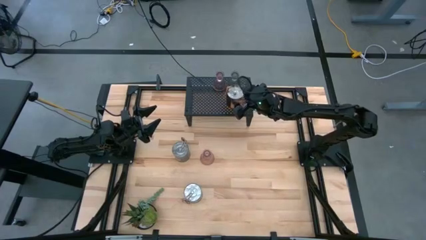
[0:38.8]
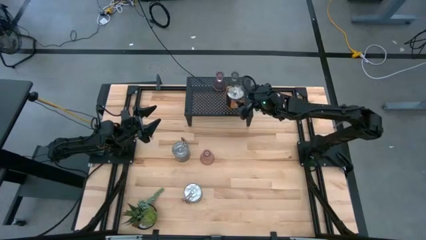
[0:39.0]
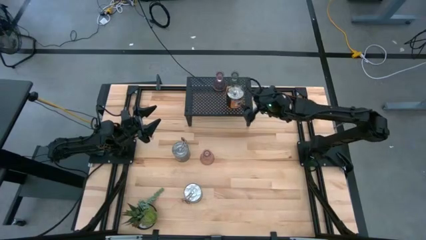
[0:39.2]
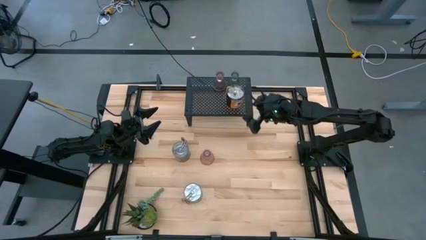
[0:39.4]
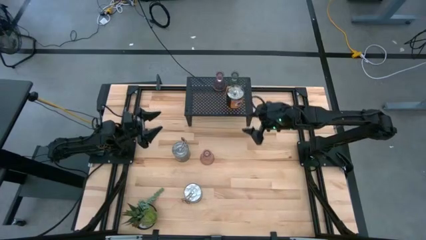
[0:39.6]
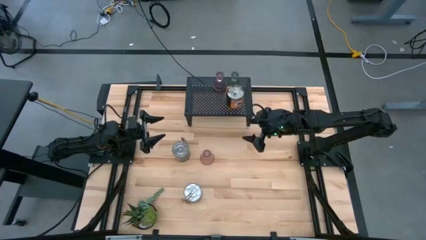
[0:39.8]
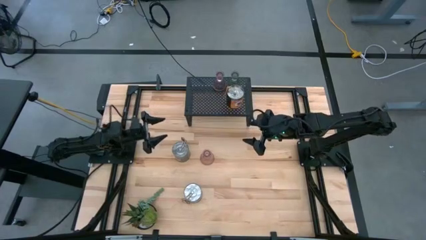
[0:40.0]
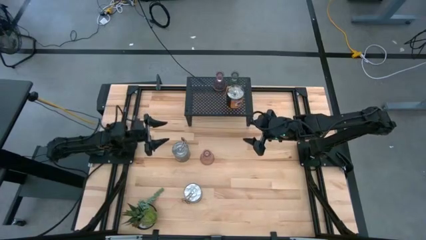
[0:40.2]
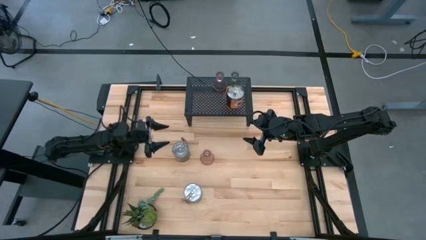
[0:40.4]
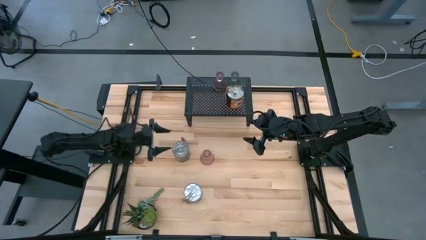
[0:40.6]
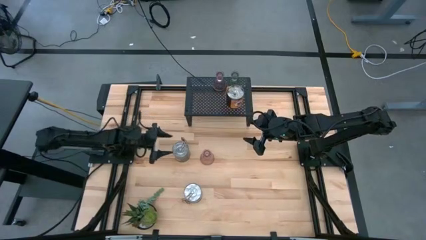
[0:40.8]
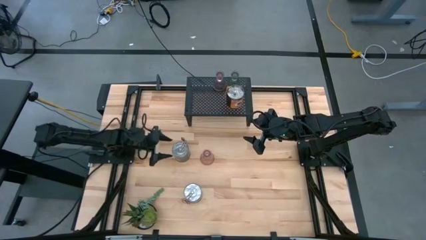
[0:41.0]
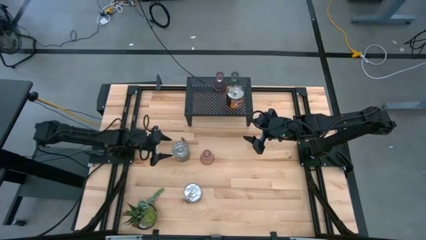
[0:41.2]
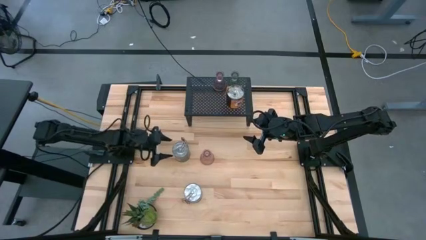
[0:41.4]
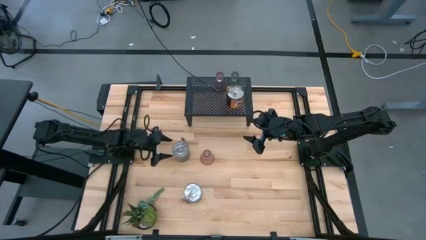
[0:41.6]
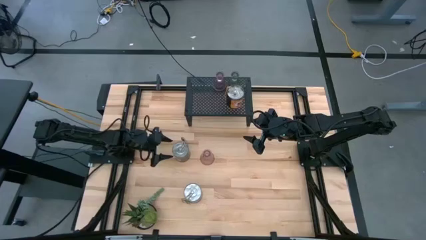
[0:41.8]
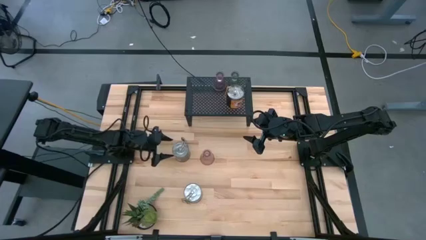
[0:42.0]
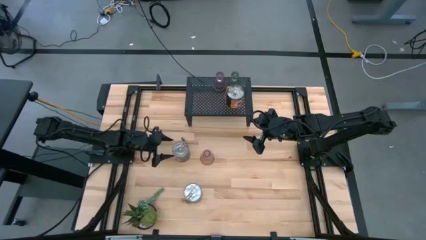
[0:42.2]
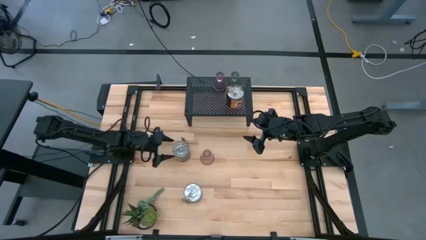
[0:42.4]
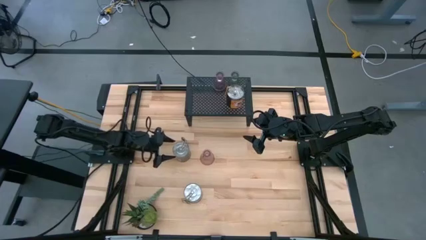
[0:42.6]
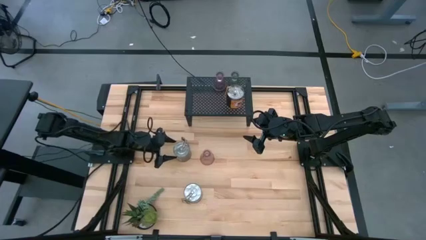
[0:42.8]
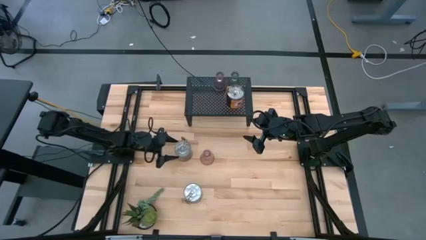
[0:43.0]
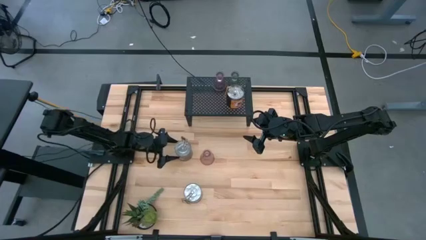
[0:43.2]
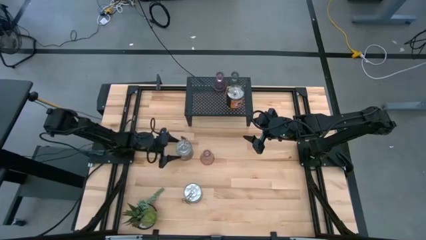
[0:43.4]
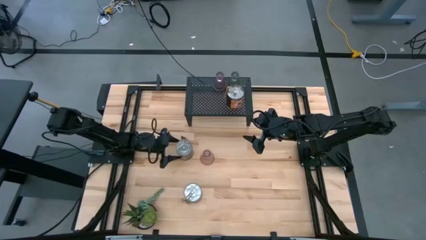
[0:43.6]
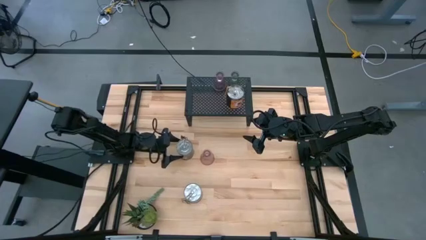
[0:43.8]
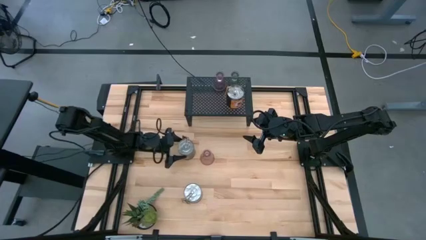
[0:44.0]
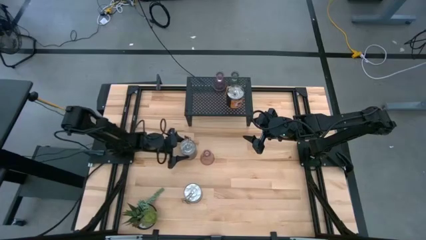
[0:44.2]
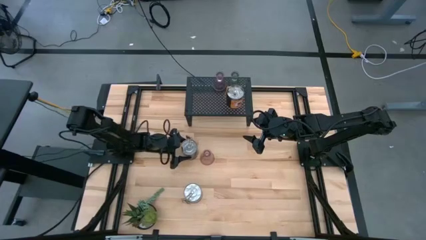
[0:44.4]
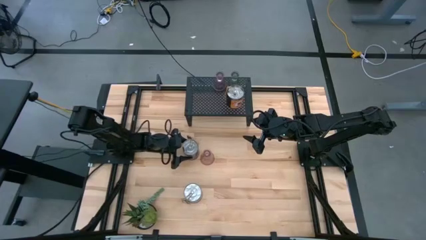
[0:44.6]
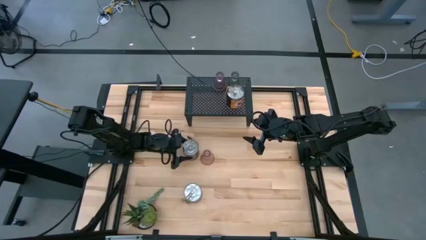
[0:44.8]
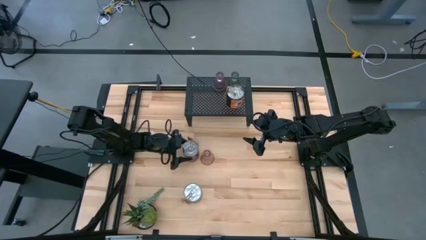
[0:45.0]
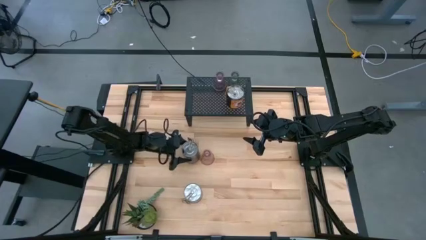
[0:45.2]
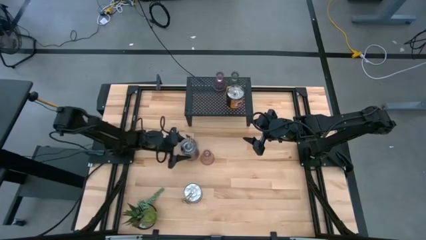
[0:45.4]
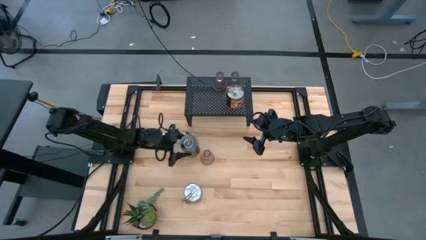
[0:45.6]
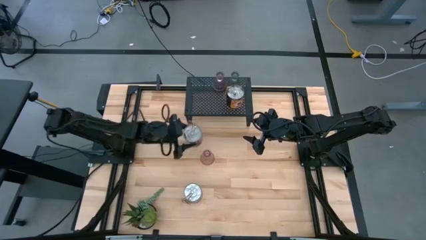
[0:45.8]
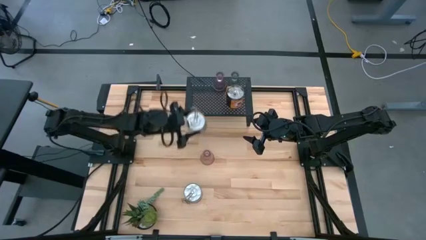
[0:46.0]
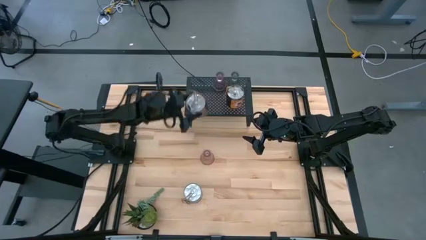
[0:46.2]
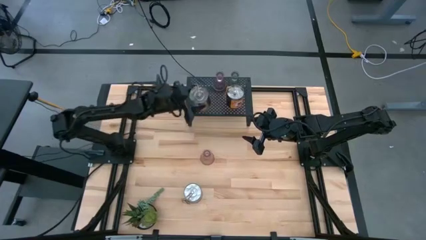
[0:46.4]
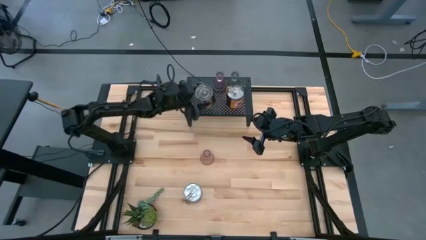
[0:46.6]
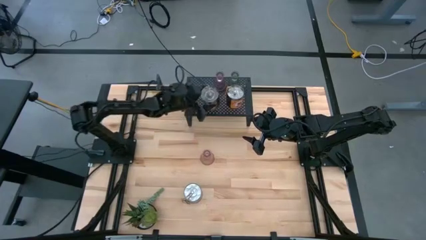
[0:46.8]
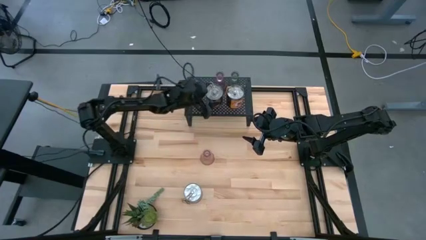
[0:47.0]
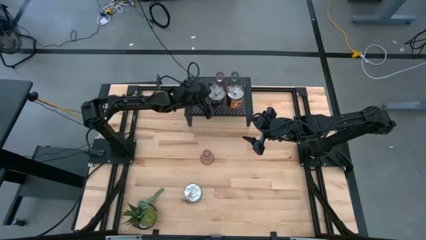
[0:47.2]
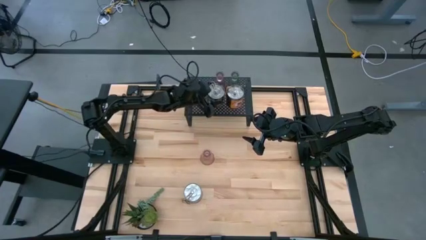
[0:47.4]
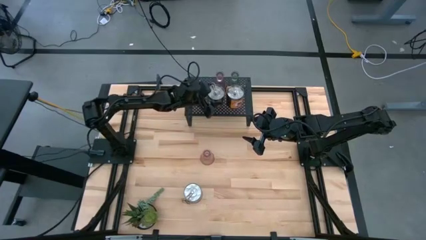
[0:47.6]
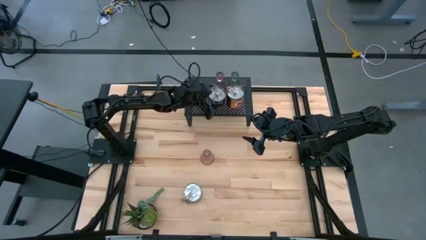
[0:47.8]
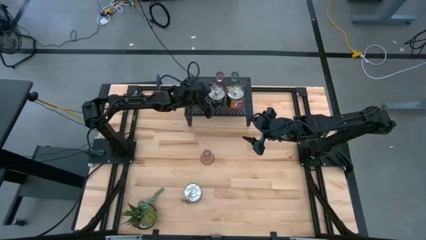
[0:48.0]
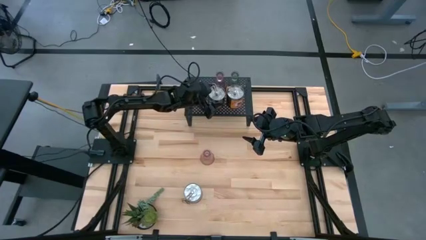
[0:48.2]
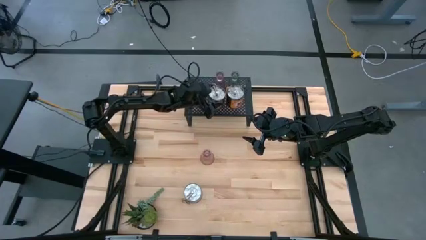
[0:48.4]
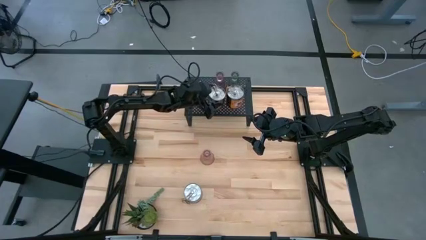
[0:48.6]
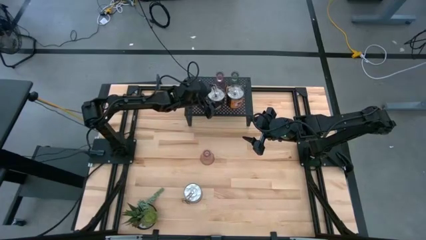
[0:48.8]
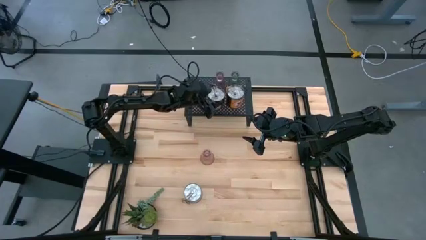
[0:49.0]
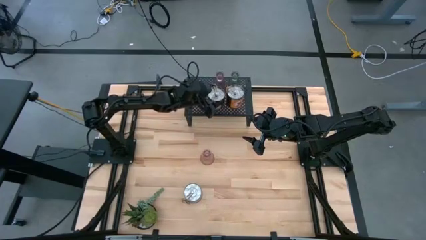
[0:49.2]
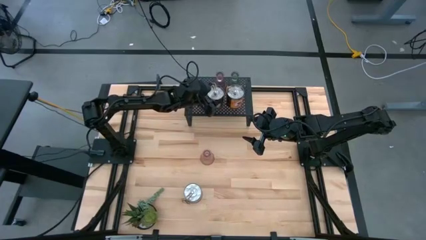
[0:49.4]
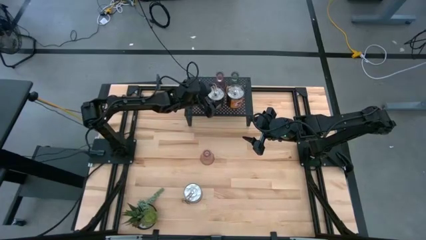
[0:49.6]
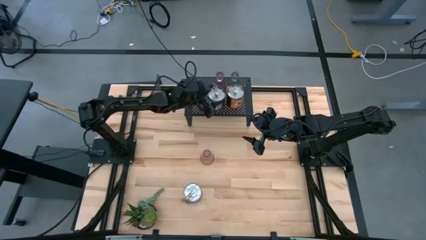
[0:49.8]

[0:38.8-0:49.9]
Task: Pick & Place candle stick holders
Put the top silver scented candle on the shelf aligned with the silver scented candle

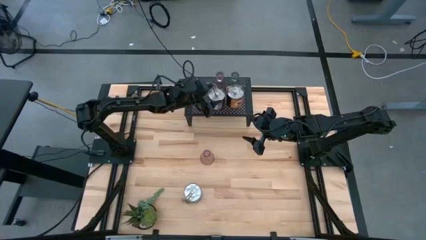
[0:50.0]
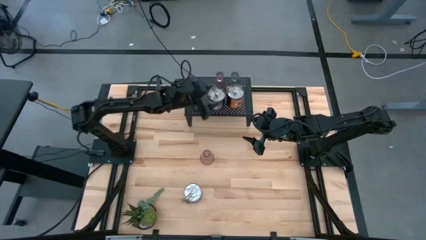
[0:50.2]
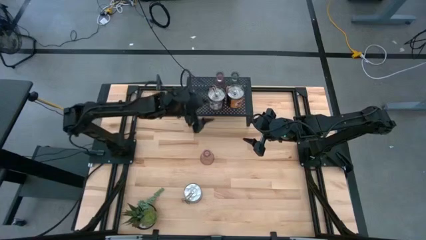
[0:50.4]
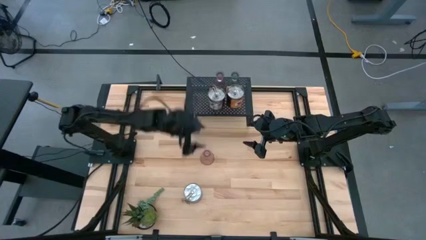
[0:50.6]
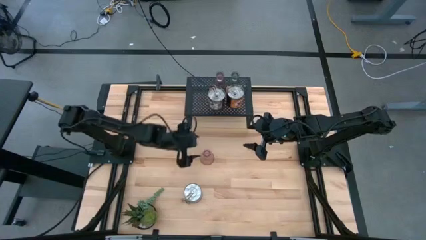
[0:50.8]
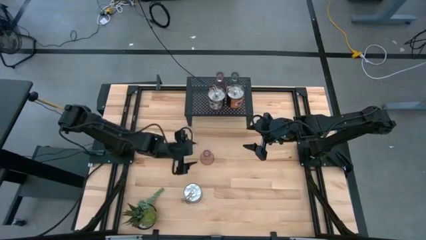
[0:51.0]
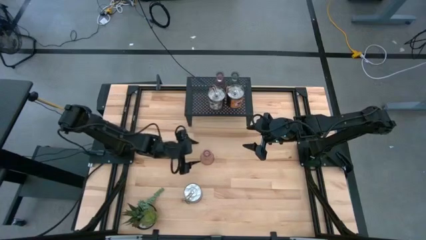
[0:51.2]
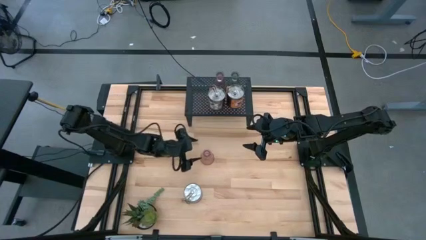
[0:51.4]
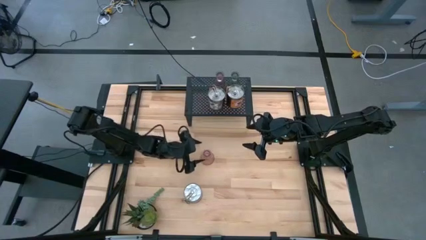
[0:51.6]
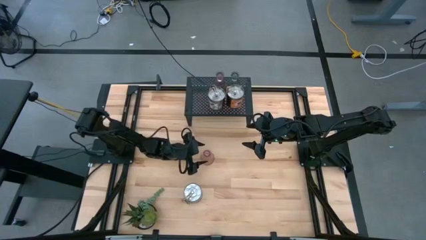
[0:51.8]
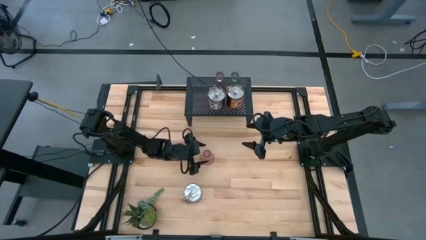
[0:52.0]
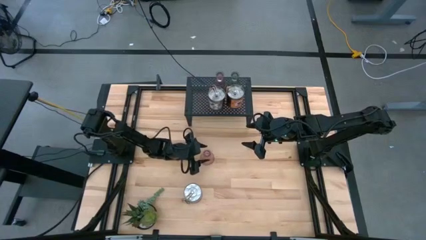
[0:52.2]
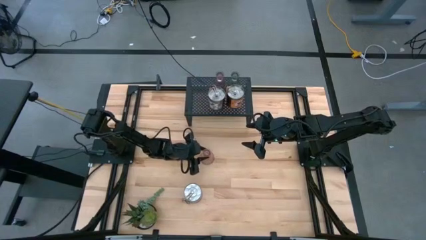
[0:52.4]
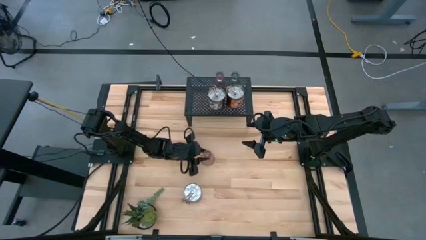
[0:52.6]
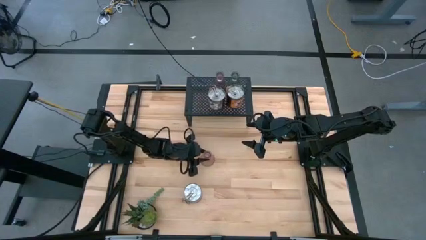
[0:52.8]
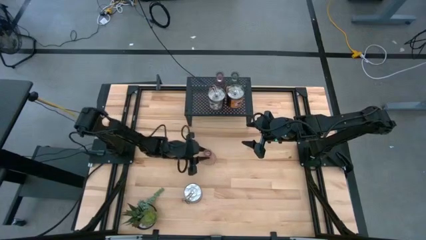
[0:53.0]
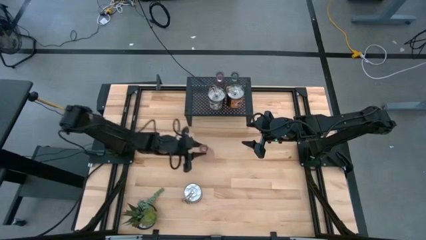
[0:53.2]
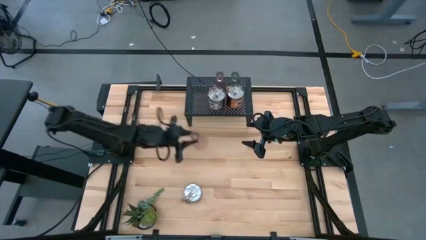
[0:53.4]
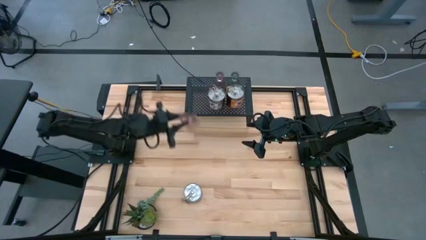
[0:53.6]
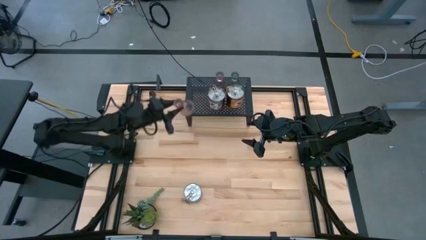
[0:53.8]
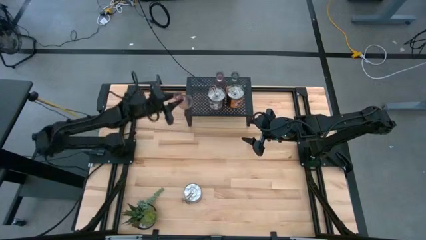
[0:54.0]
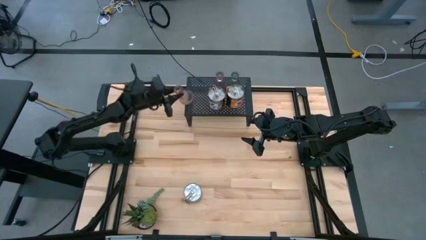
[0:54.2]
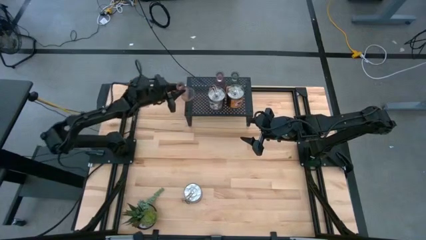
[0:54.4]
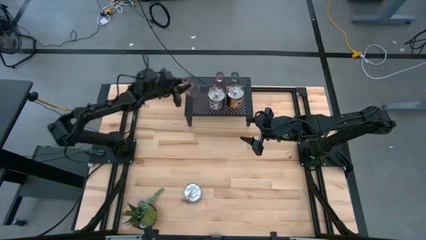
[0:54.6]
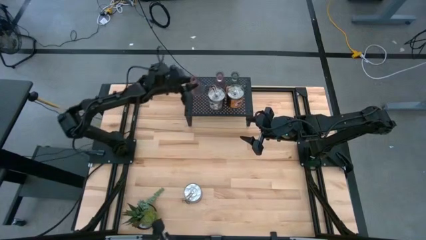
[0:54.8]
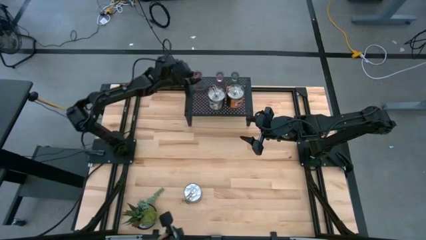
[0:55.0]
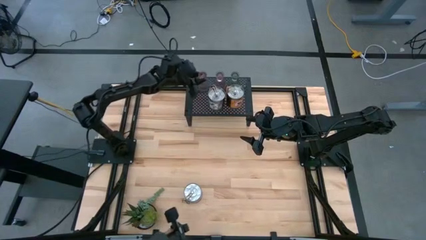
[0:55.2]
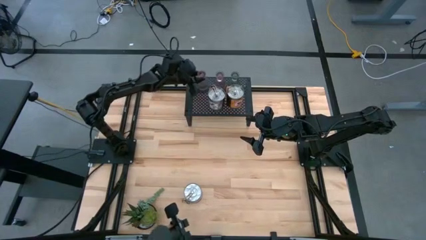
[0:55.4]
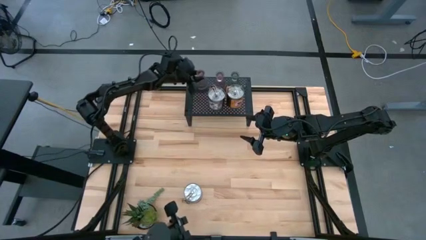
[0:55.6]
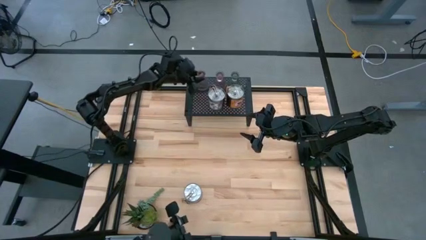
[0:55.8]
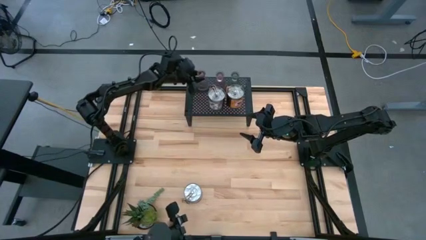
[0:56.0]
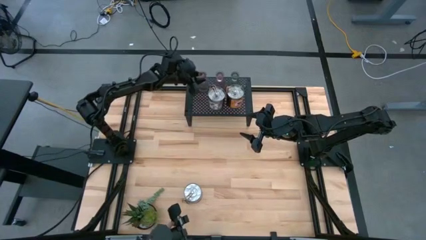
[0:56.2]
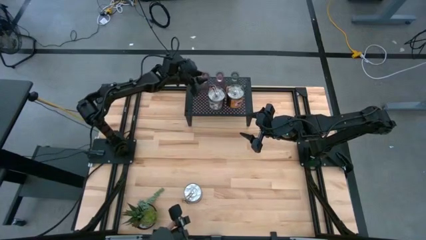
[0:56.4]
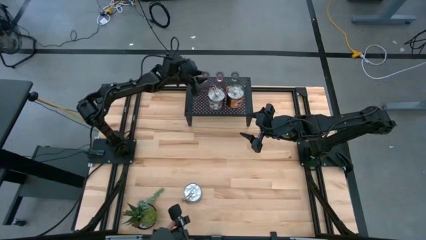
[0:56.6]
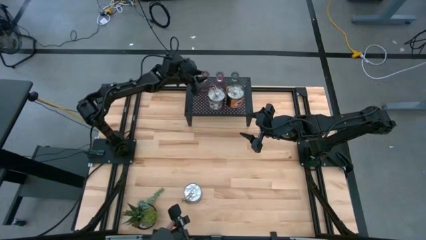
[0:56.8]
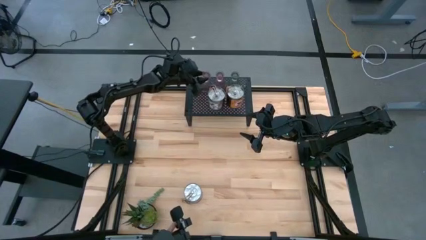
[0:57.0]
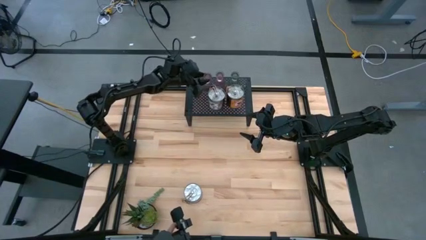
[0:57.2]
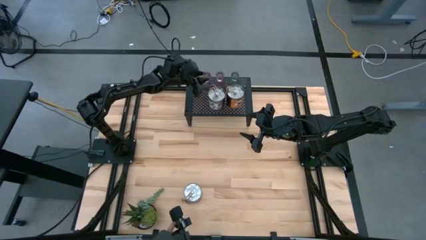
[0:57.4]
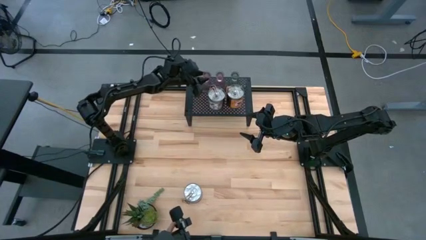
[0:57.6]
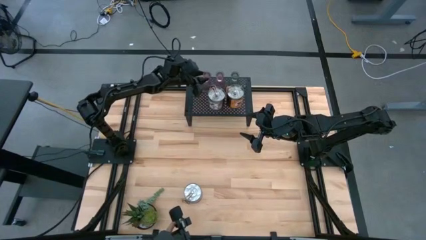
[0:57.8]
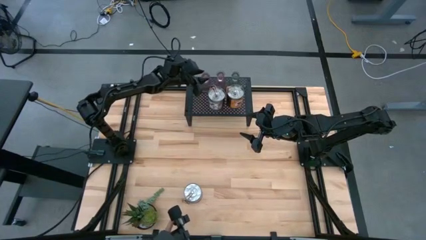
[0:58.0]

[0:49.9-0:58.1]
Align the red candle holder with the red candle holder on the shelf
